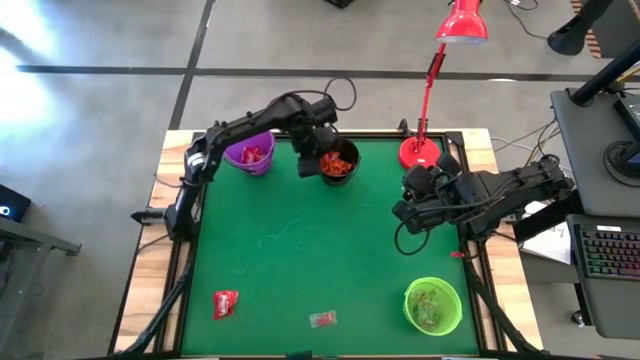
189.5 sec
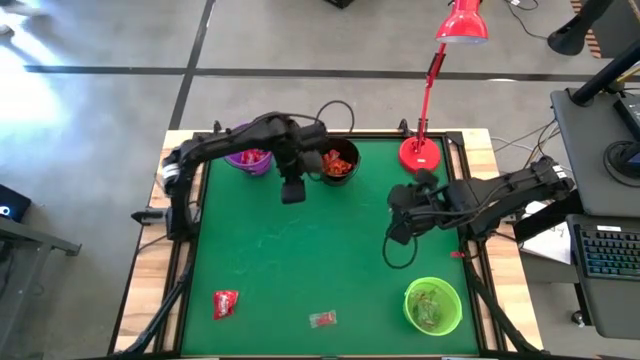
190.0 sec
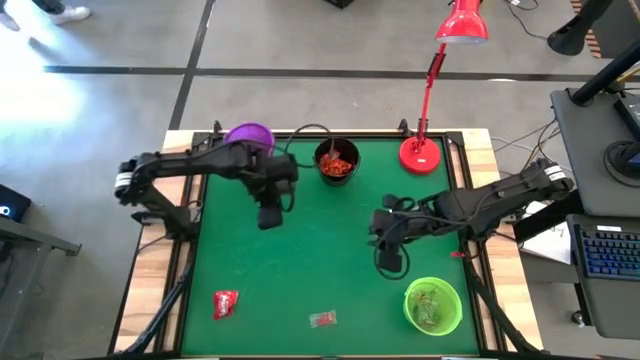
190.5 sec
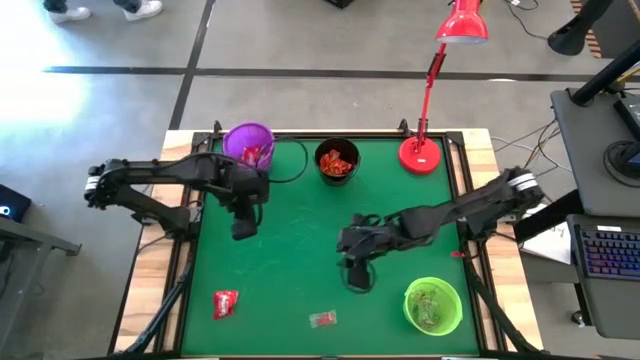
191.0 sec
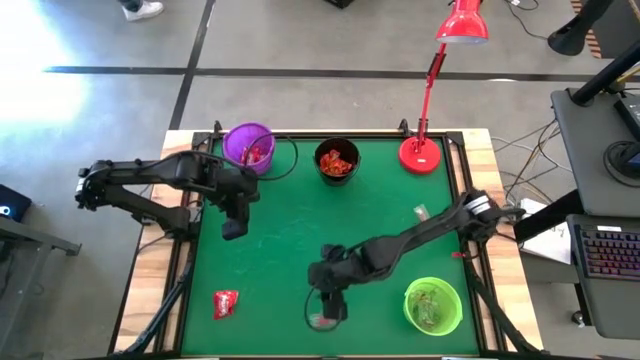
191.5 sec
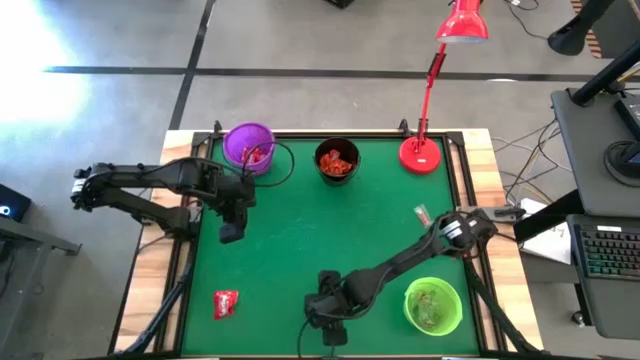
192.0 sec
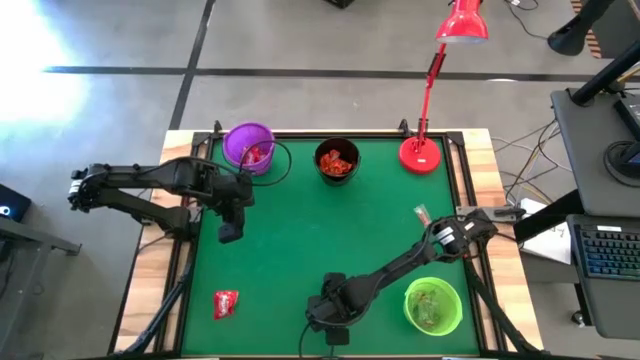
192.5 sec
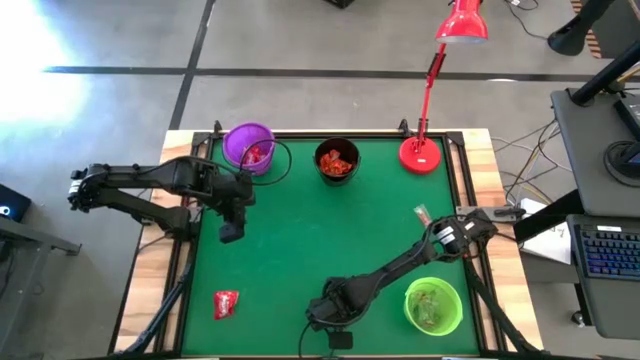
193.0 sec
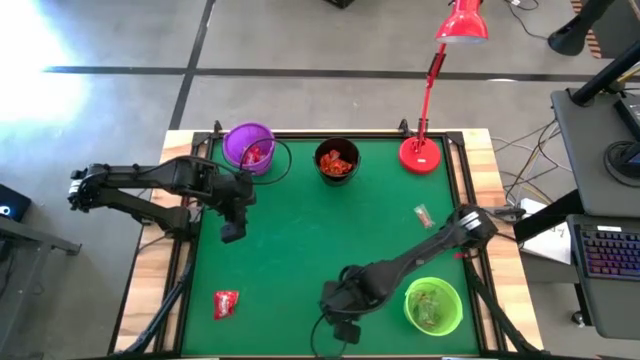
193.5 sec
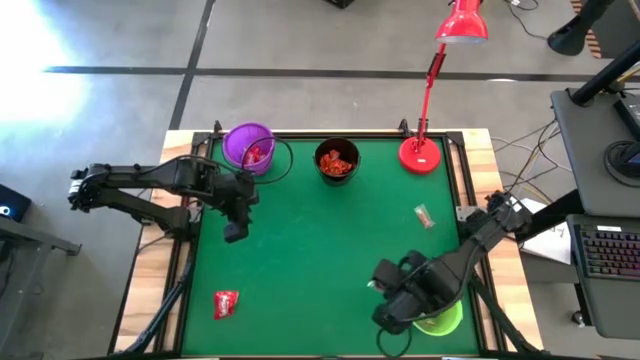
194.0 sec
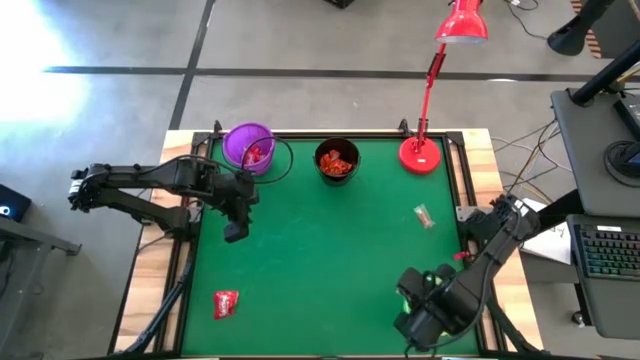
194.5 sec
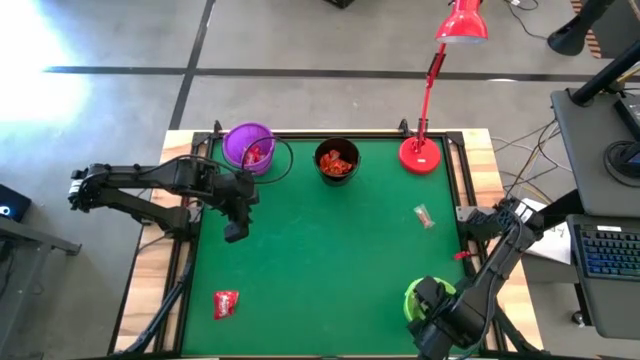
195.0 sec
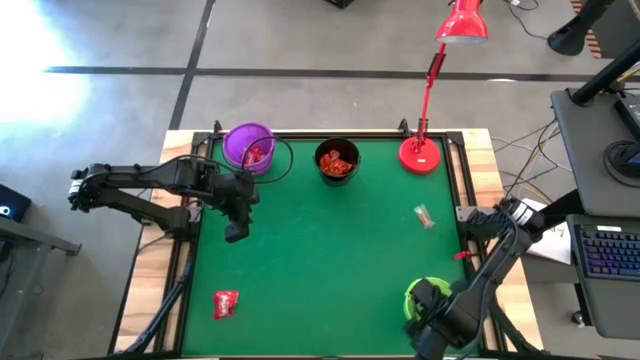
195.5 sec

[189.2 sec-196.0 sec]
Task: Sort candy
Put the red gummy into the green bucket

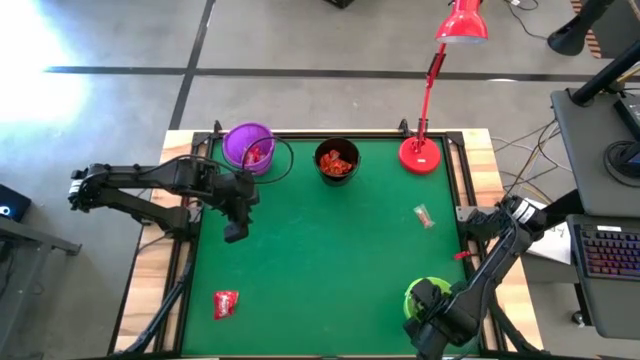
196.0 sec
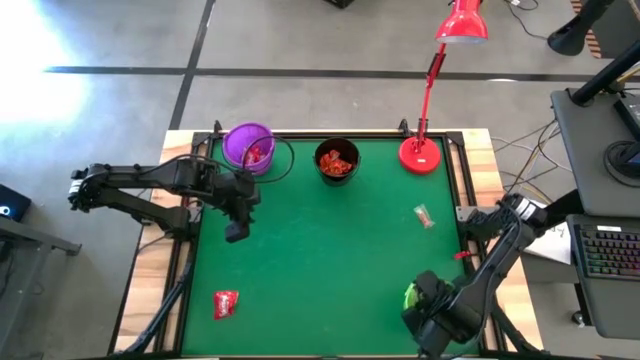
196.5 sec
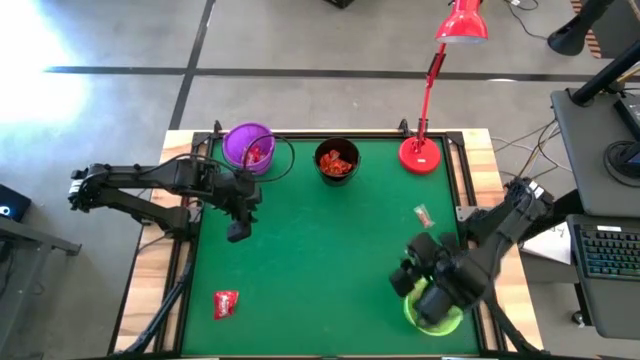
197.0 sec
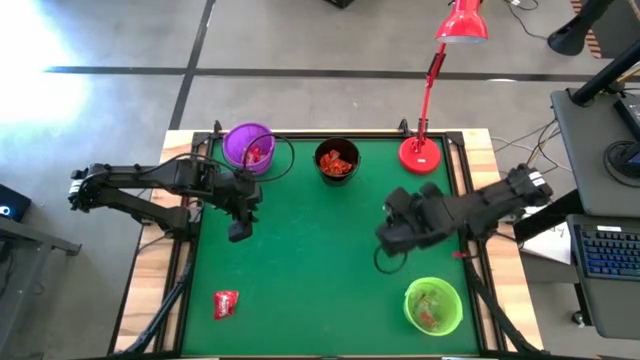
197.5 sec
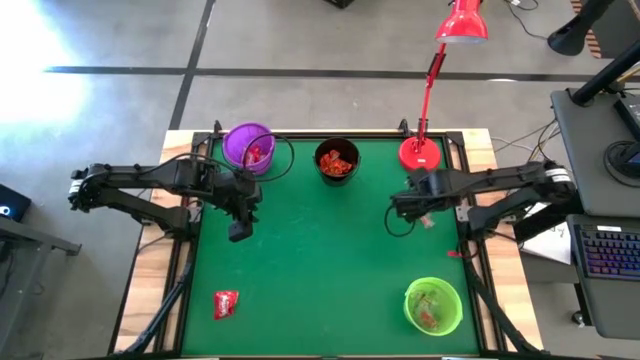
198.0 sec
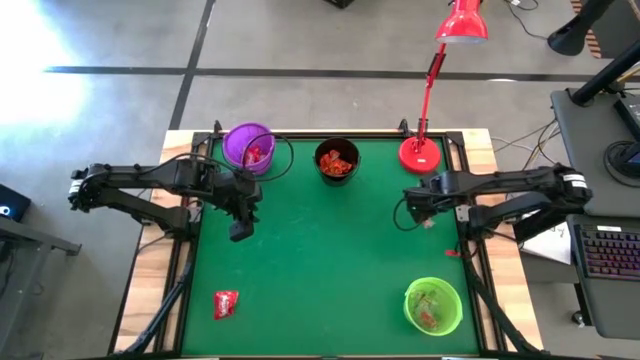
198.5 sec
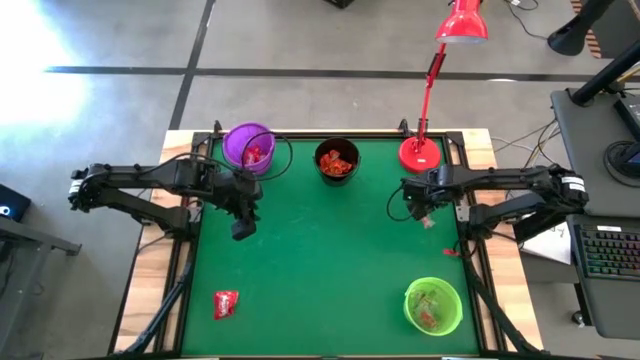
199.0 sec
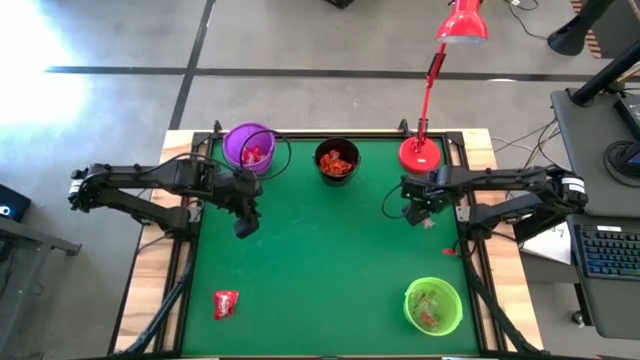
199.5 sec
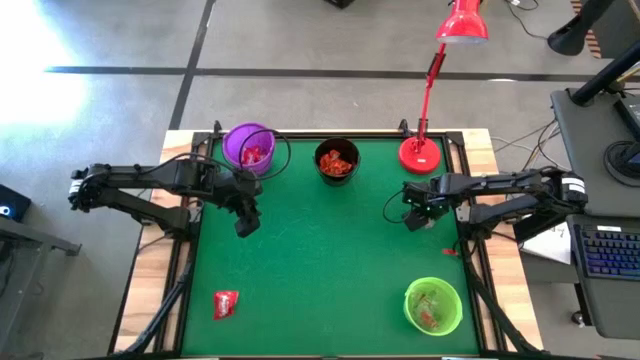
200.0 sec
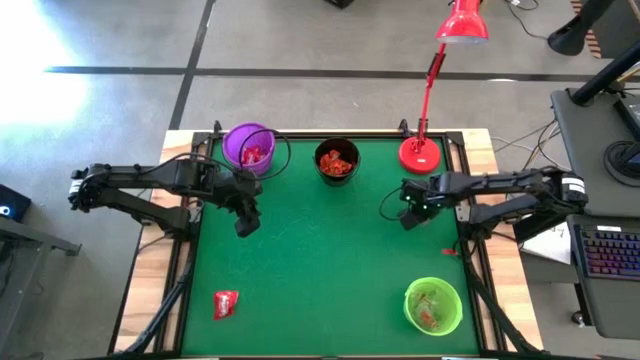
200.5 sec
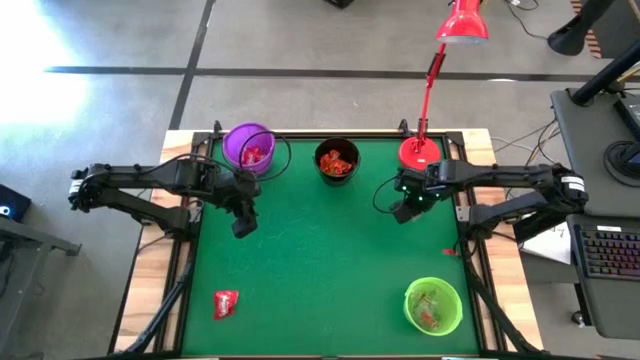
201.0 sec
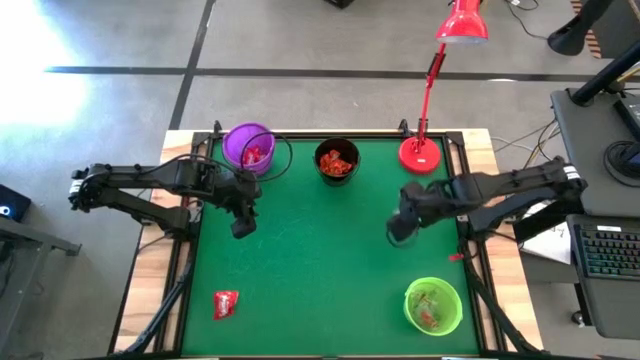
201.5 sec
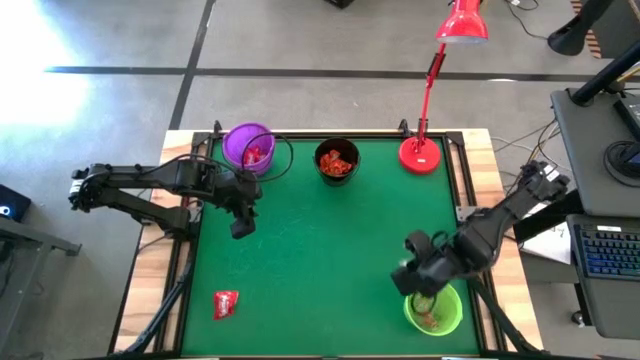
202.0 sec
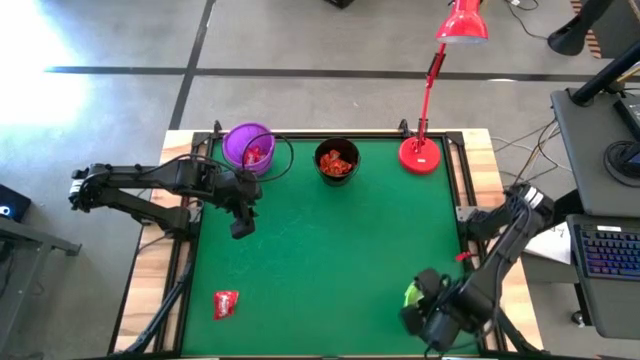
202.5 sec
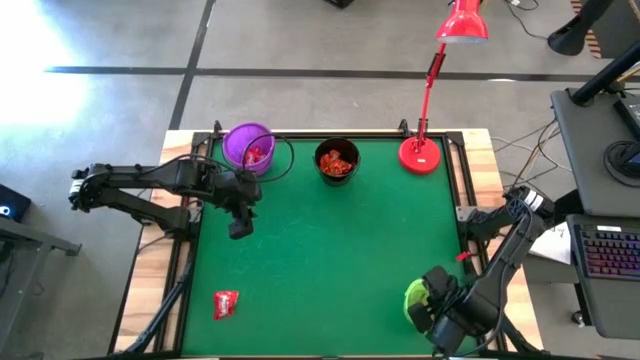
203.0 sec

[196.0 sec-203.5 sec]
Put the red gummy into the green bucket

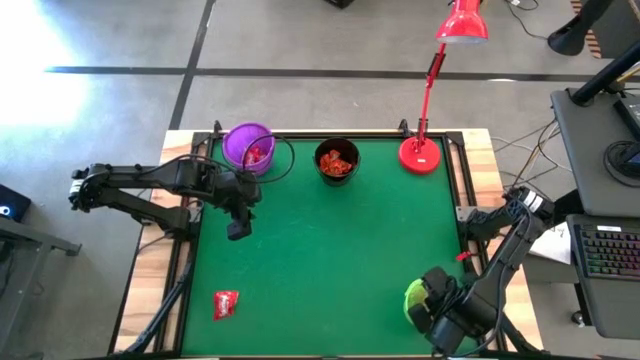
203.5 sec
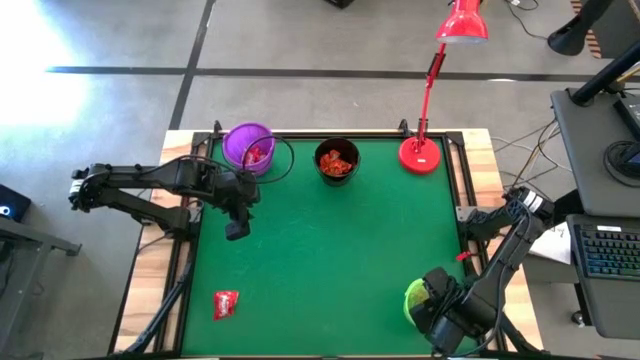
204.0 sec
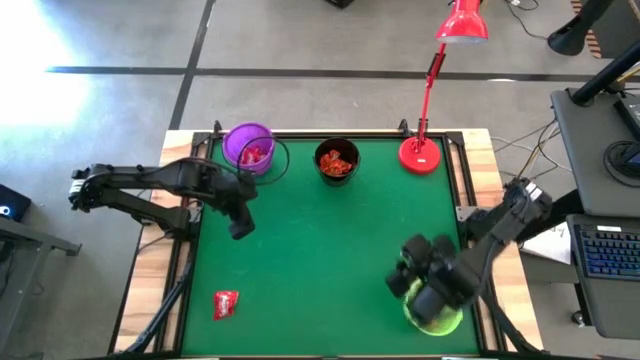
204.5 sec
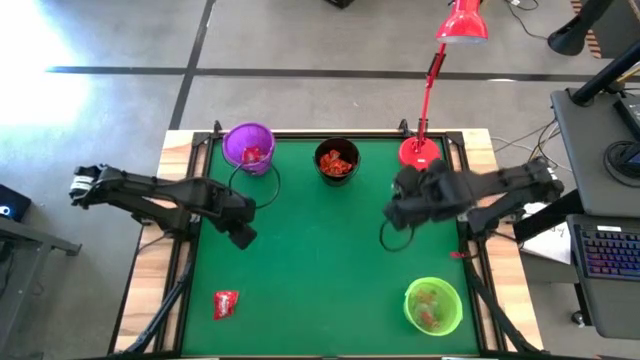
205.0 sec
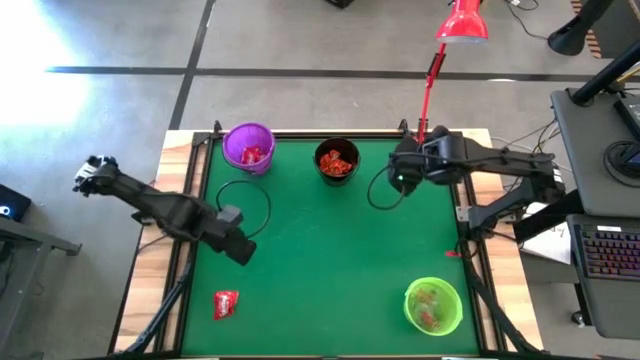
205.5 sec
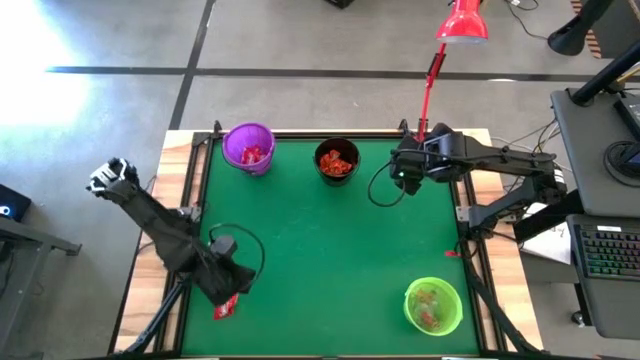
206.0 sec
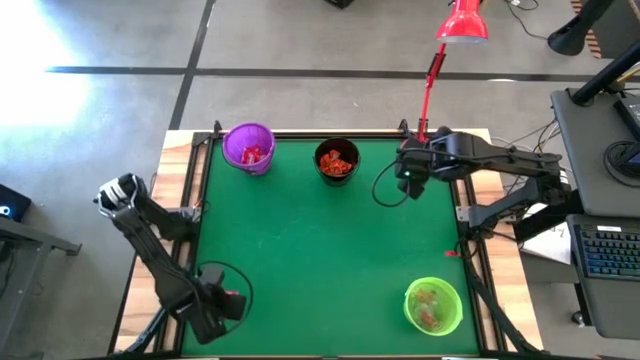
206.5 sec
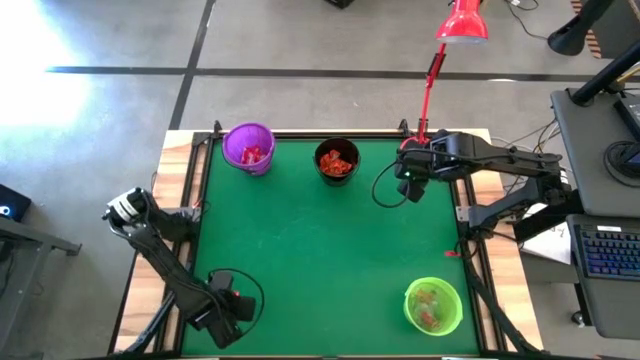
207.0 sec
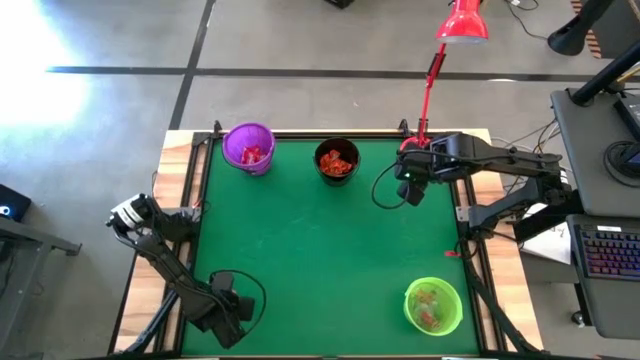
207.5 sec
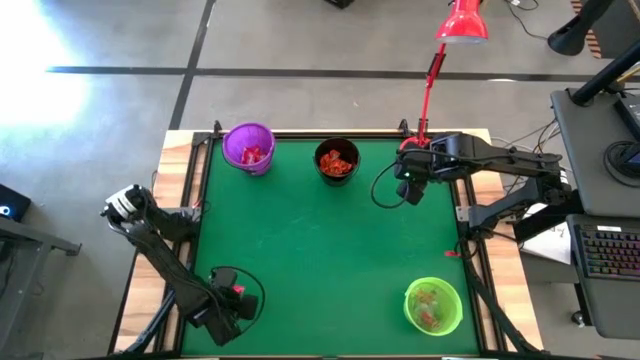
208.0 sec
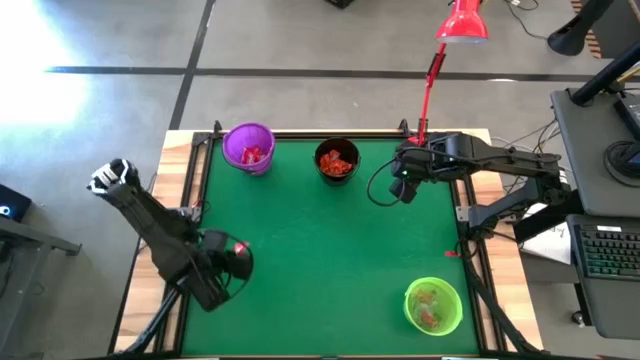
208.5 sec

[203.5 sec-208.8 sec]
Put the red candy into the purple bucket

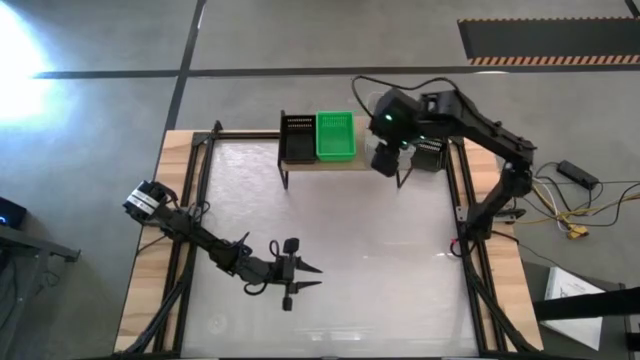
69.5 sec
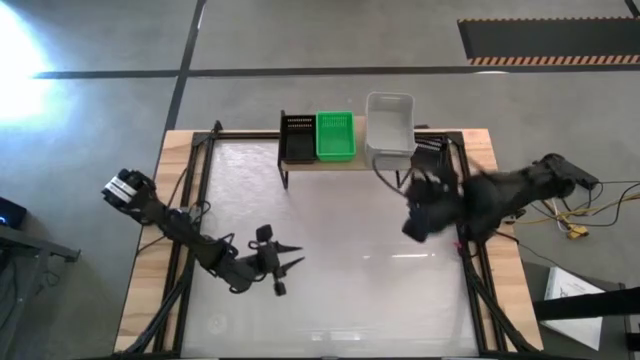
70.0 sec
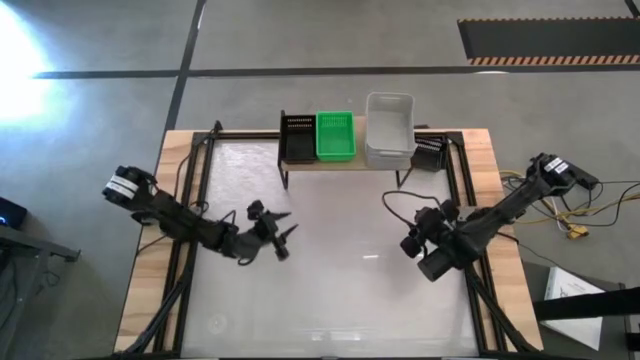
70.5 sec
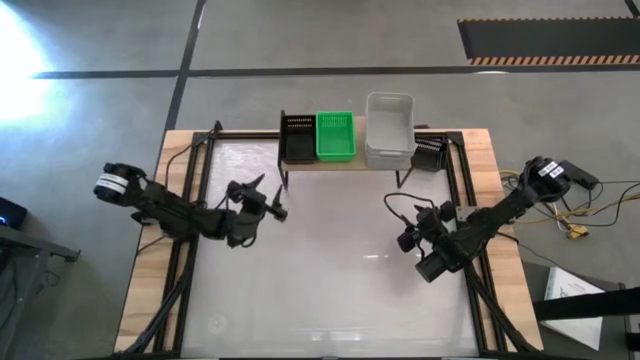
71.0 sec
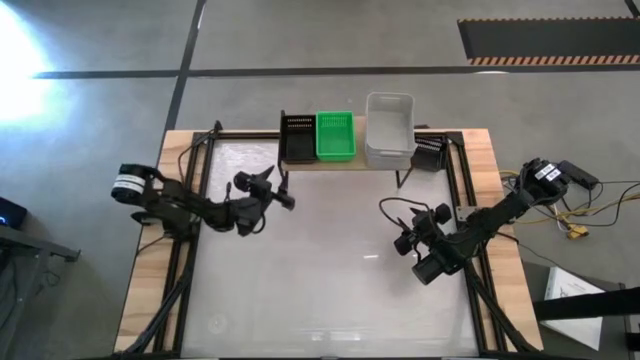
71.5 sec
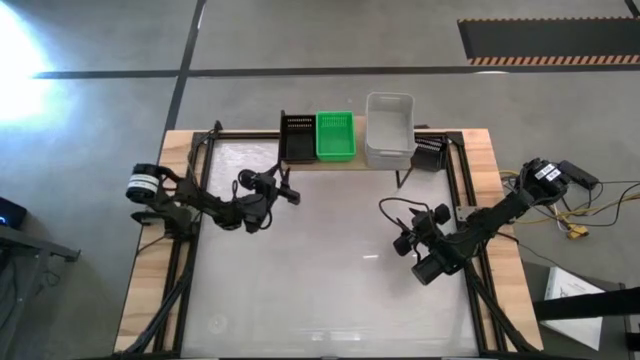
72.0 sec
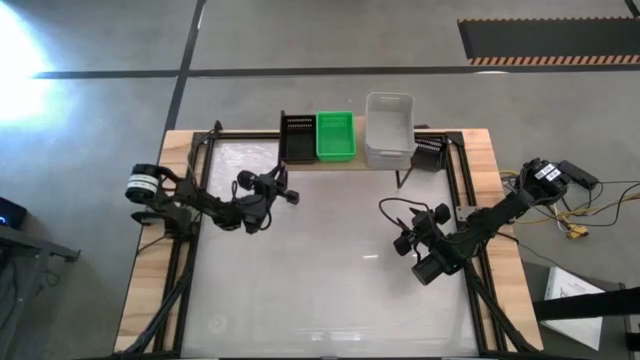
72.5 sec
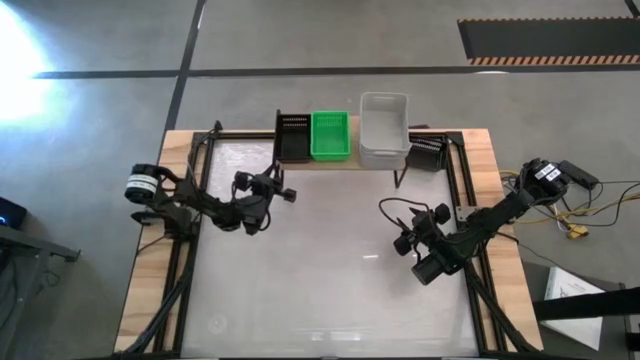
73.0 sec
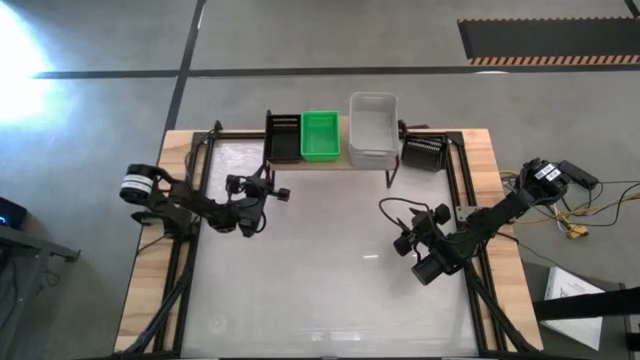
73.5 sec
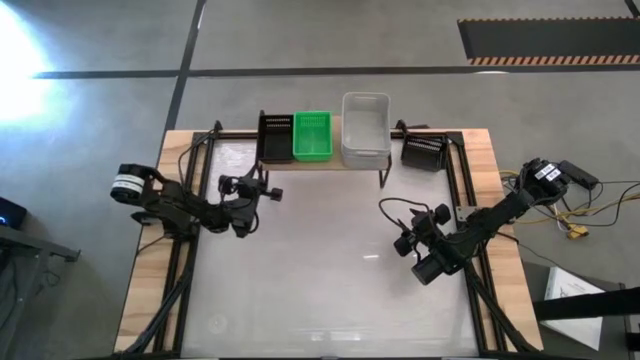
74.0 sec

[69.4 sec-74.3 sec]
Task: Stack baskets on shelf by color
Adjust the shelf
